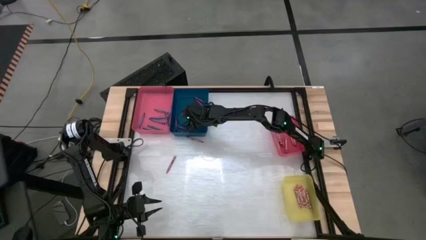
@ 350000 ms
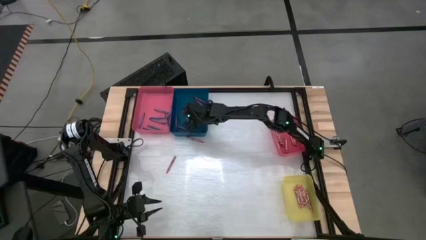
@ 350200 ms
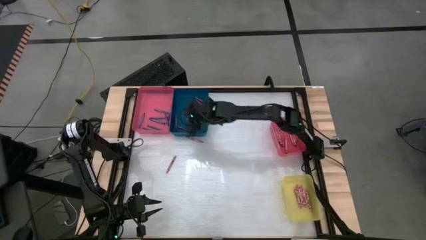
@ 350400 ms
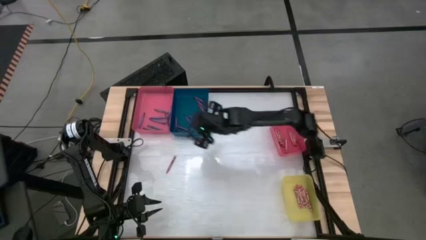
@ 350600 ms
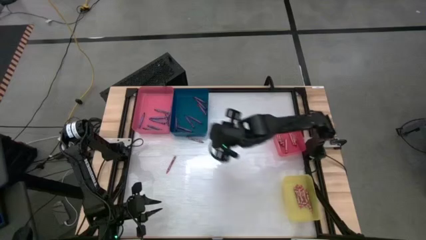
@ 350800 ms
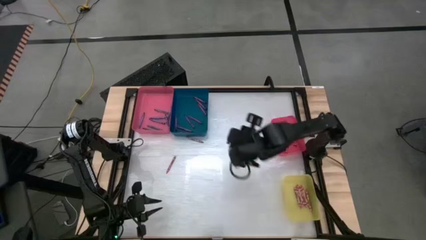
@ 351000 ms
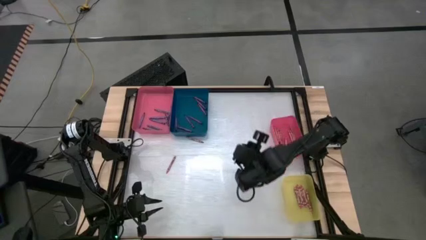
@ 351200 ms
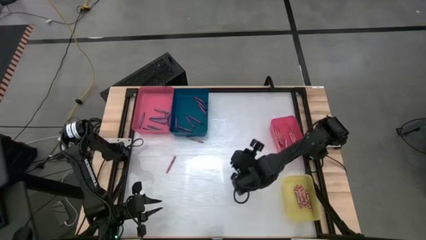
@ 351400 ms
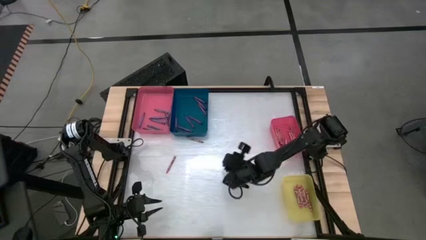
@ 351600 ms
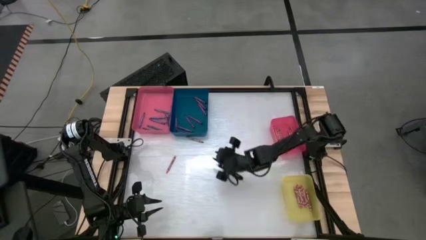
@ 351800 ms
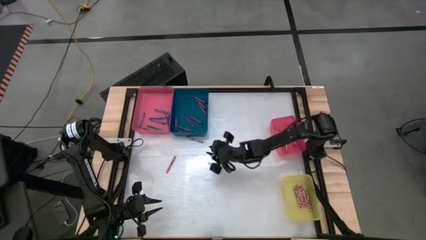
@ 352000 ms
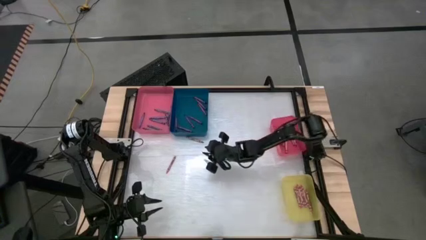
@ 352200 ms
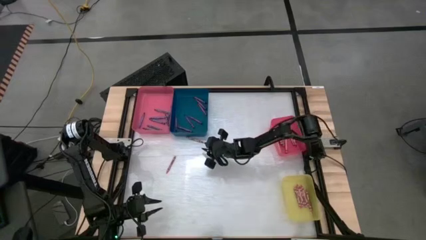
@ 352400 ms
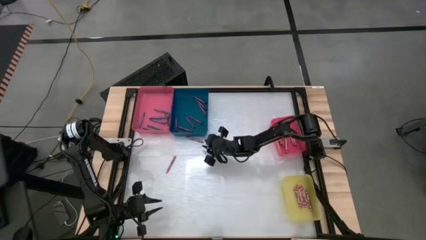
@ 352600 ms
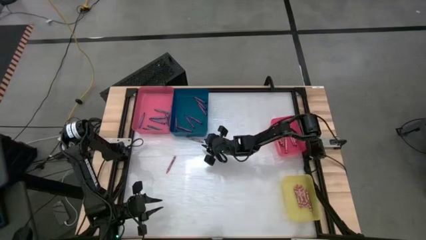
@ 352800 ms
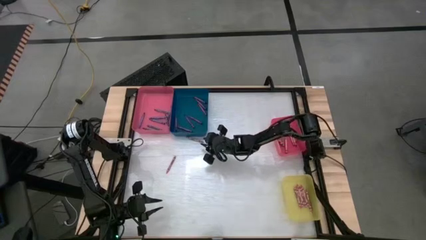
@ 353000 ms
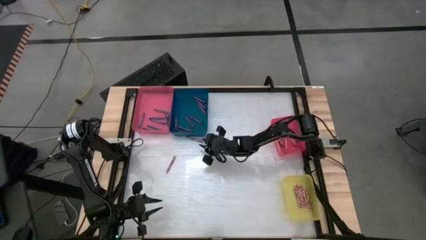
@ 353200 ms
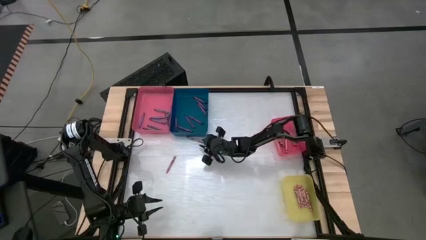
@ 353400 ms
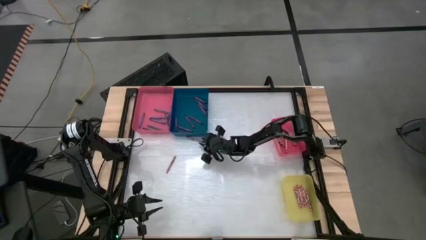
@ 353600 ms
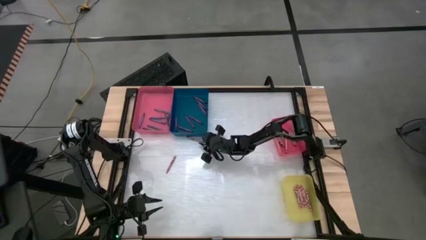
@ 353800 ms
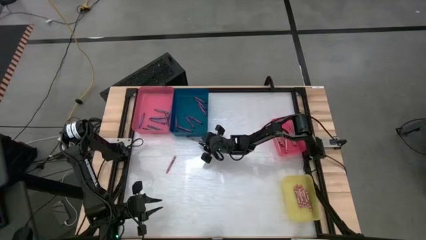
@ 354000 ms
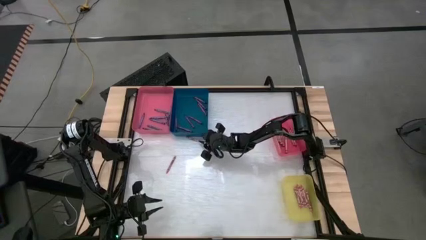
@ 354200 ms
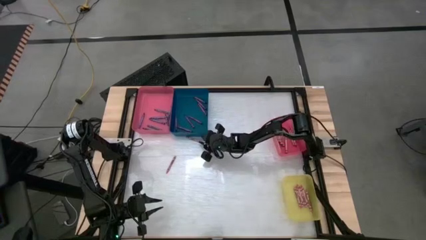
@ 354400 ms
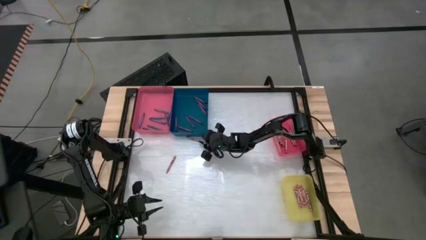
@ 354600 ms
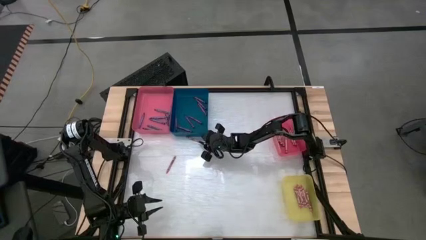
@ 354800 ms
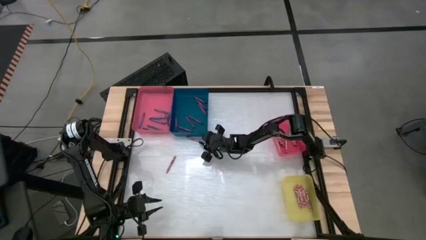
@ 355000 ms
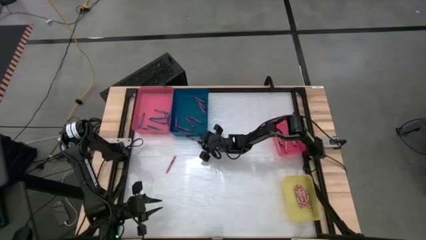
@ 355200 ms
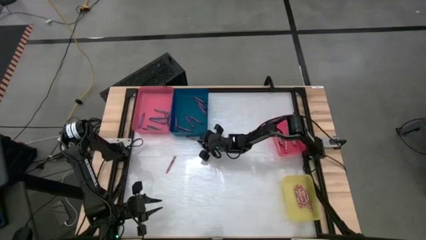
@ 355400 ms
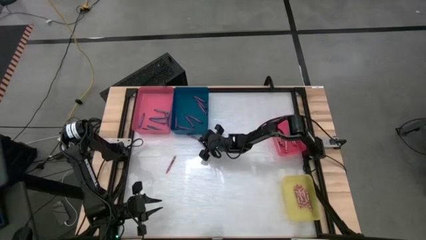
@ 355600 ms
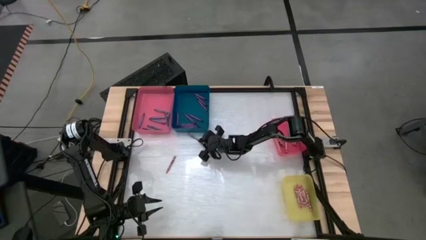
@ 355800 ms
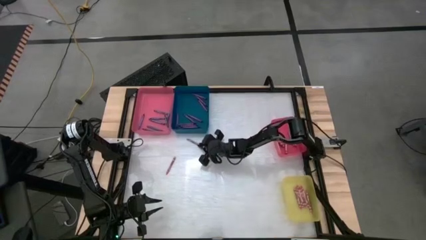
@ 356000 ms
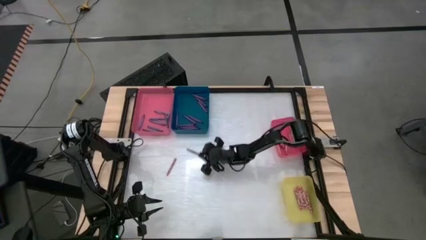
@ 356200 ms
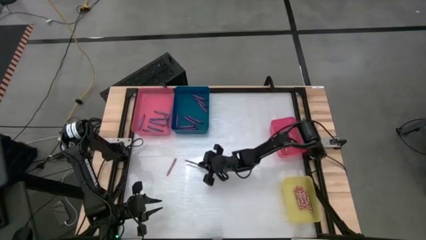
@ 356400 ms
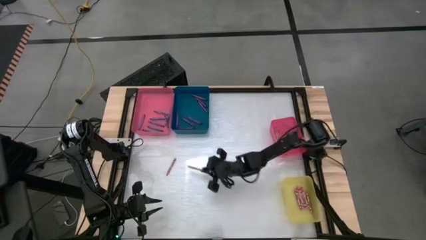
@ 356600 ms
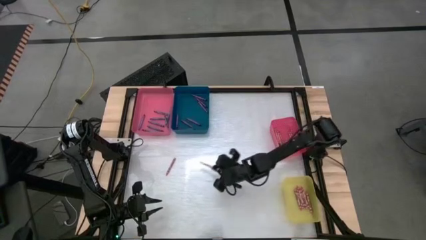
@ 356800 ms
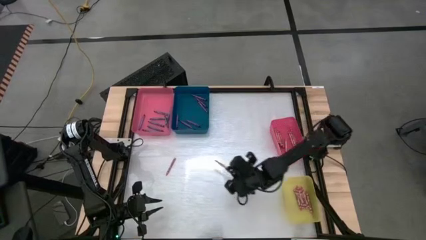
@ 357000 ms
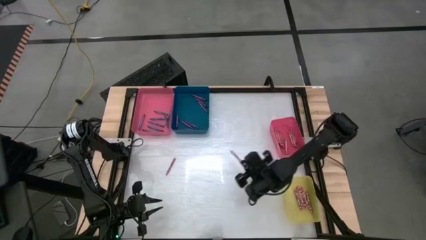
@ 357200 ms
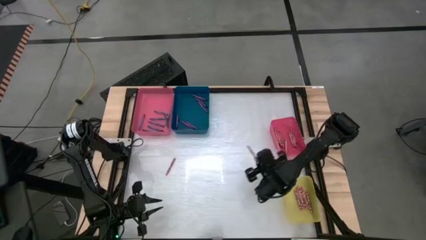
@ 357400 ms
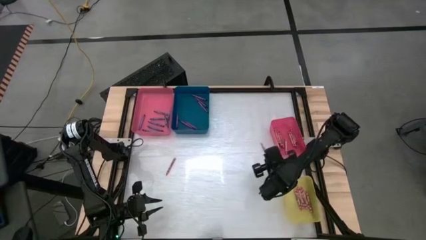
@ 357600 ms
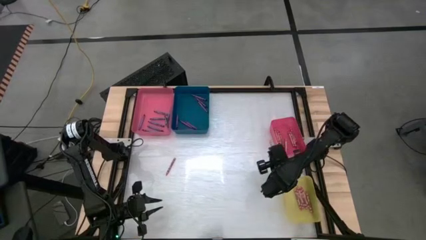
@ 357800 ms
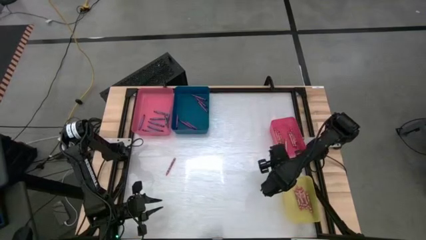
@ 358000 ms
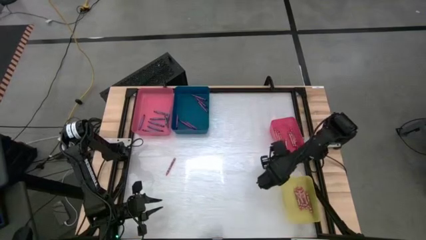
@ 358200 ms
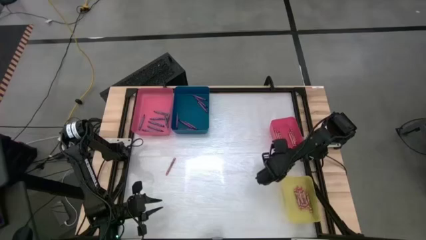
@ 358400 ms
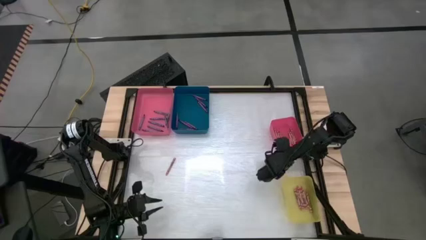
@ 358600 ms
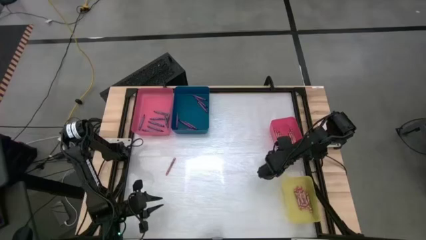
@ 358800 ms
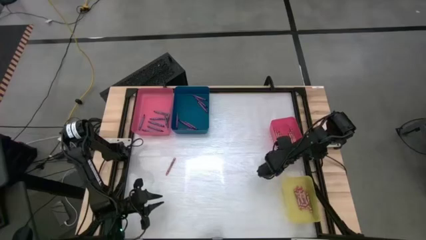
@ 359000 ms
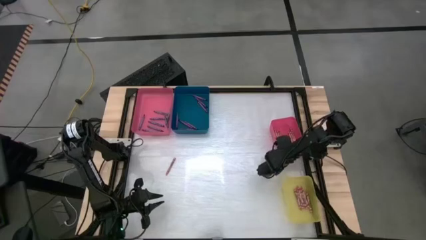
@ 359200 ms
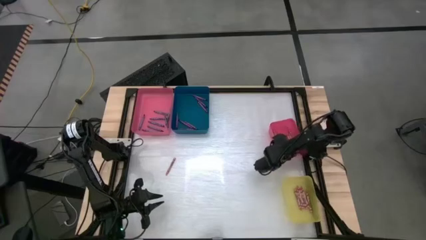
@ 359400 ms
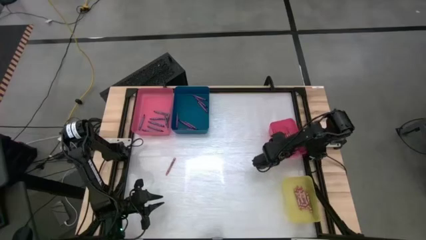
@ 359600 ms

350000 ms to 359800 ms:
Task: Sort crayons
Put the red crayon into the small red bin
